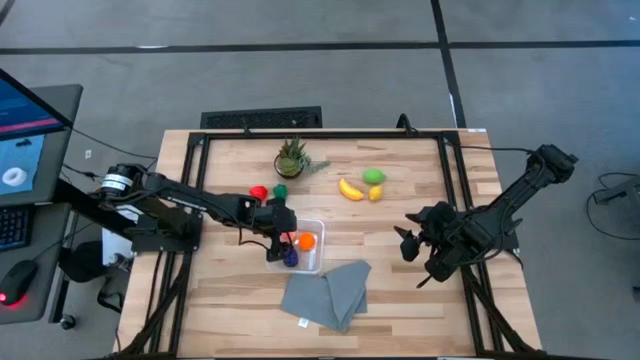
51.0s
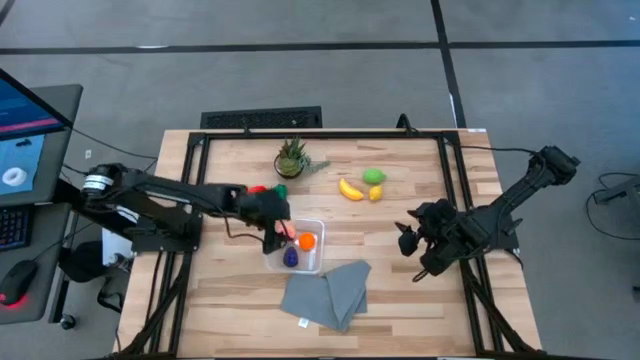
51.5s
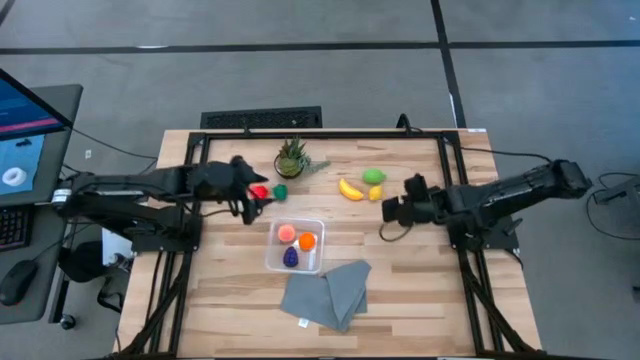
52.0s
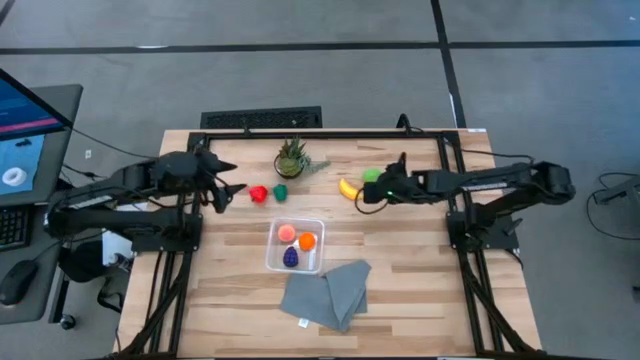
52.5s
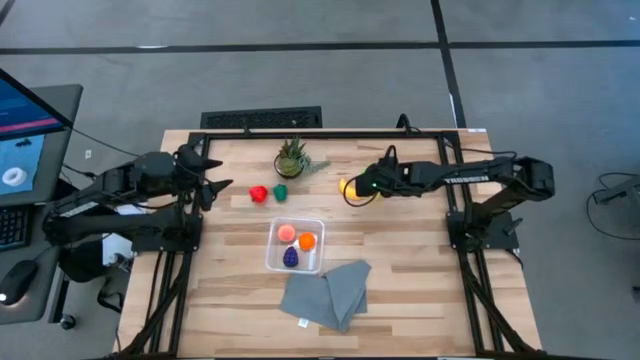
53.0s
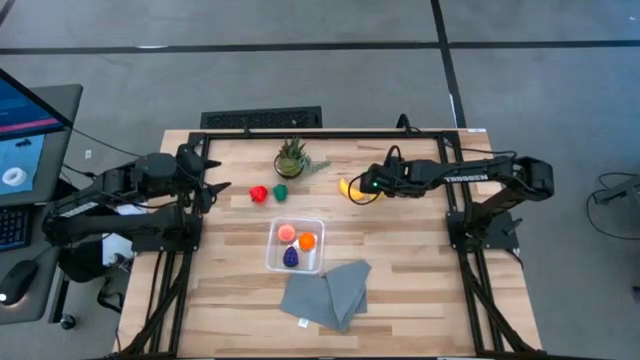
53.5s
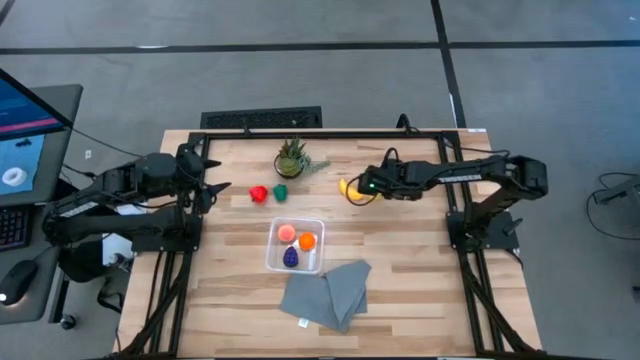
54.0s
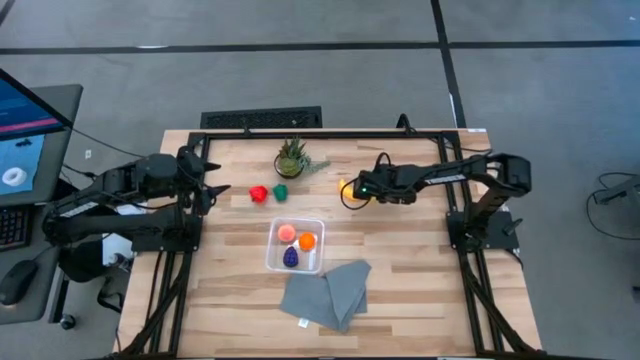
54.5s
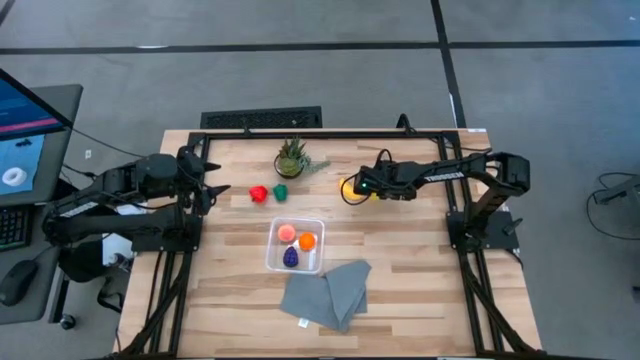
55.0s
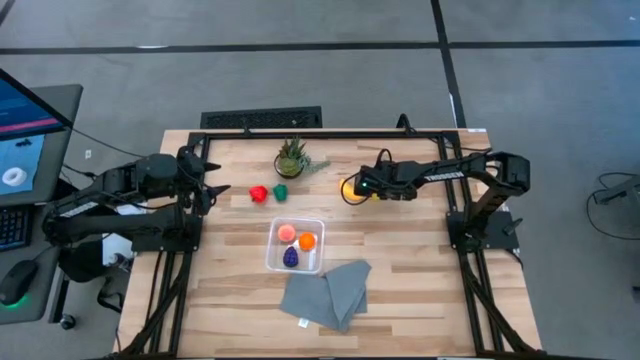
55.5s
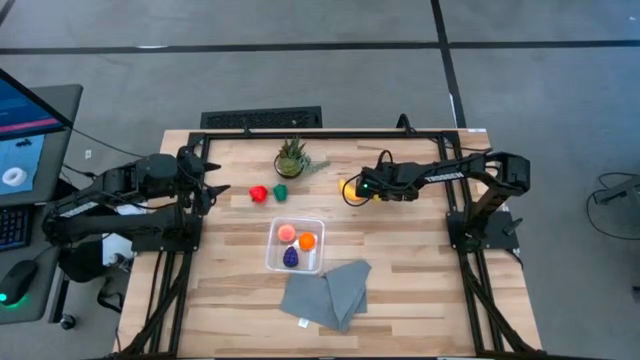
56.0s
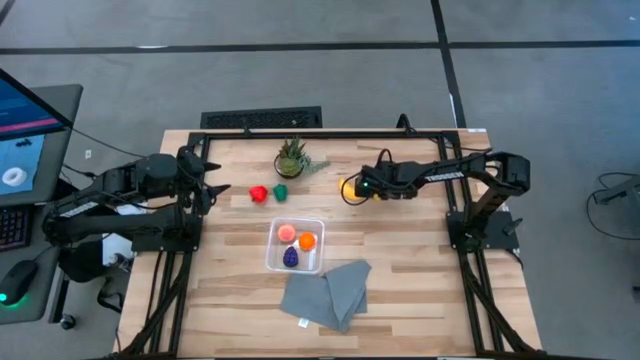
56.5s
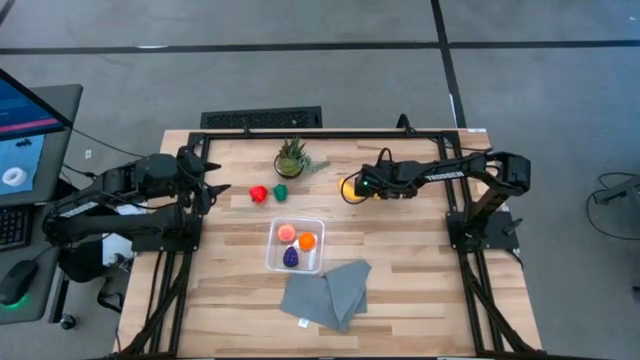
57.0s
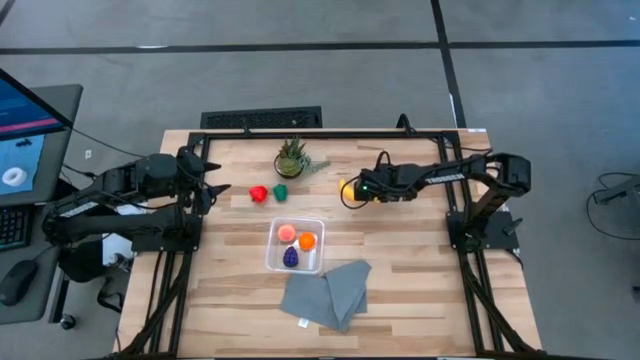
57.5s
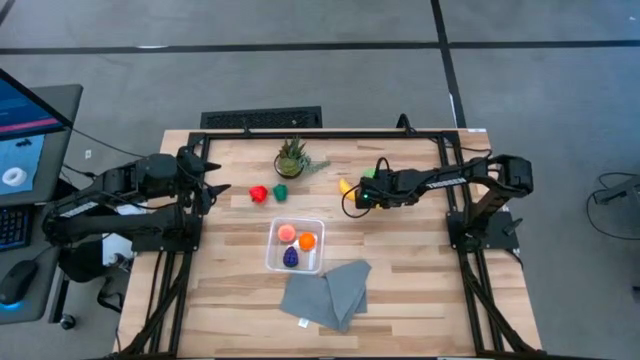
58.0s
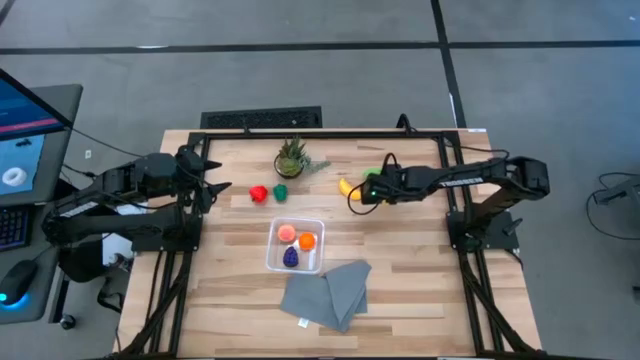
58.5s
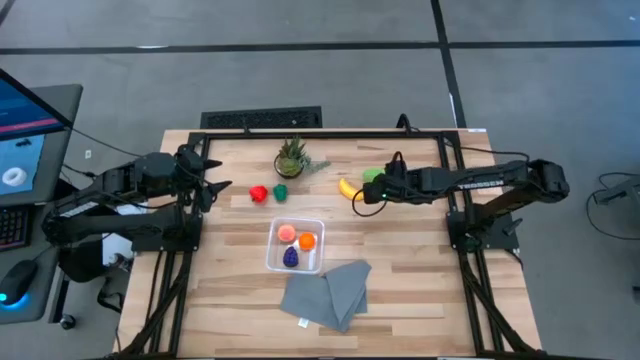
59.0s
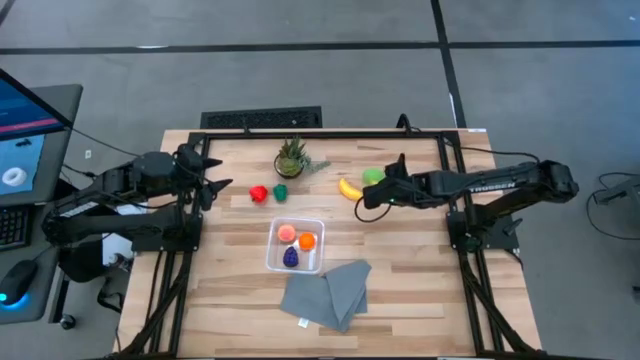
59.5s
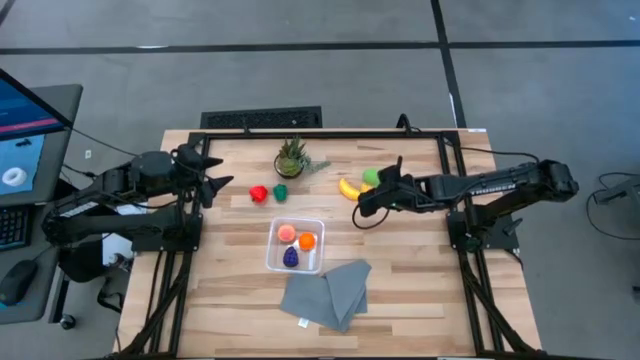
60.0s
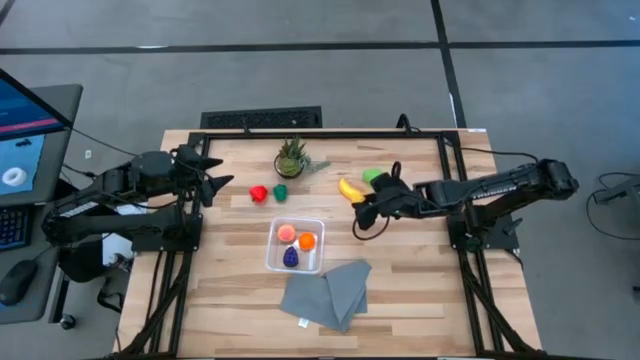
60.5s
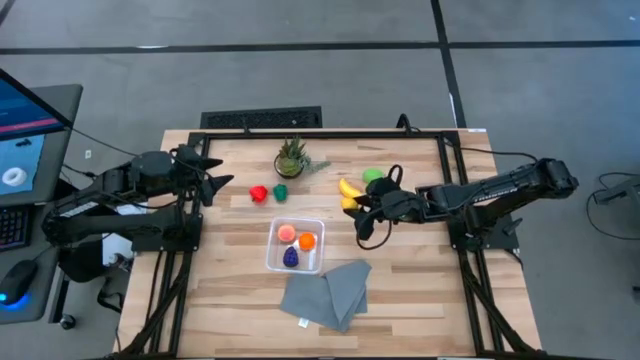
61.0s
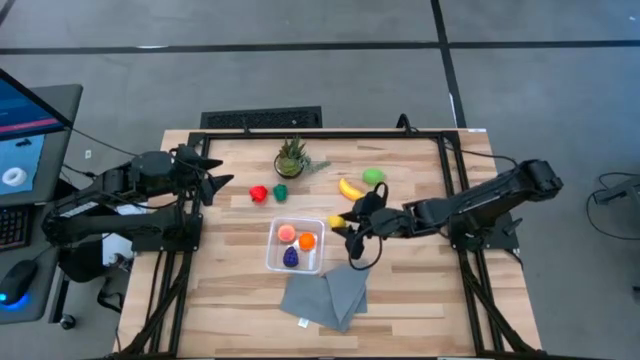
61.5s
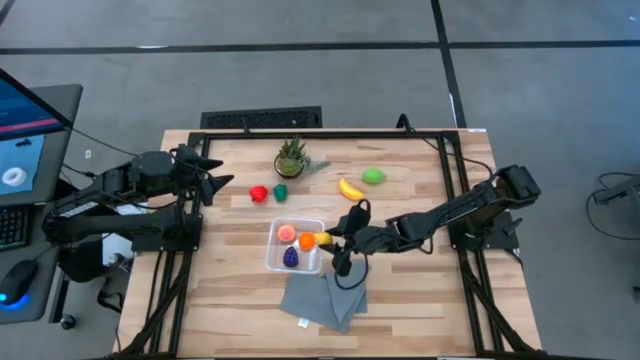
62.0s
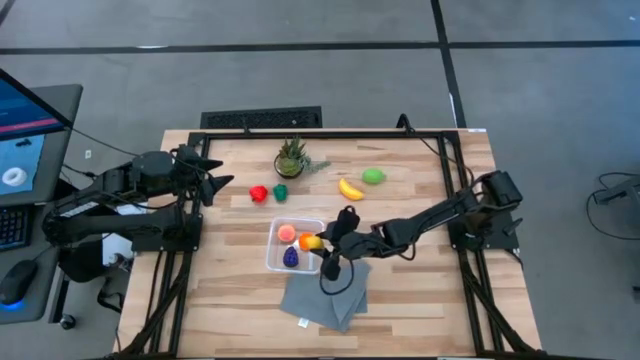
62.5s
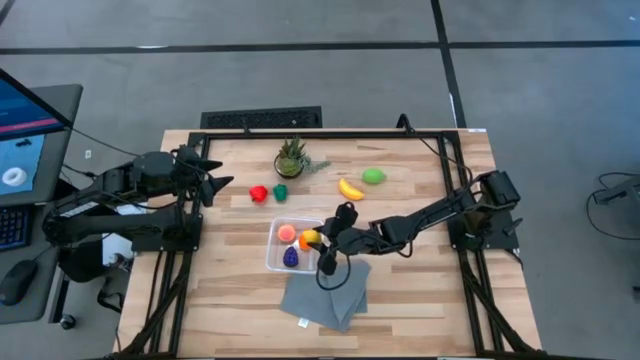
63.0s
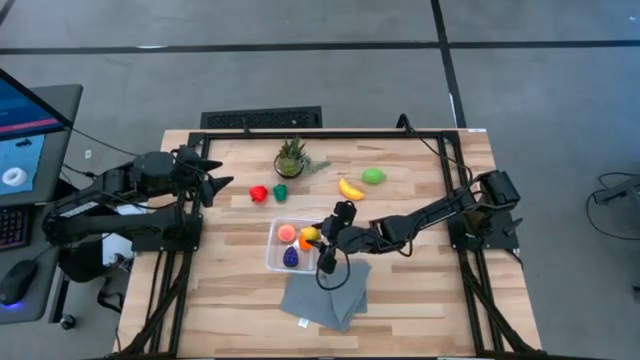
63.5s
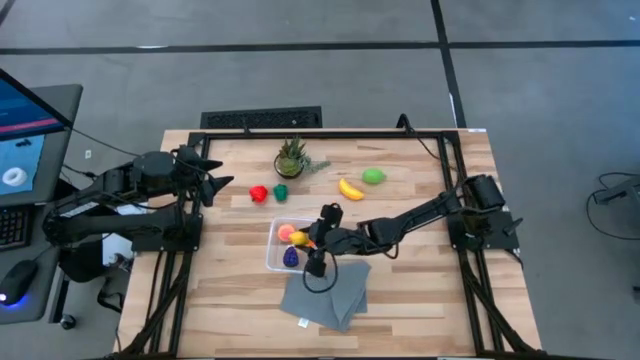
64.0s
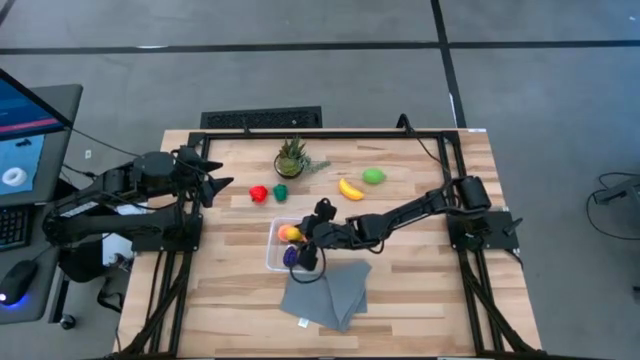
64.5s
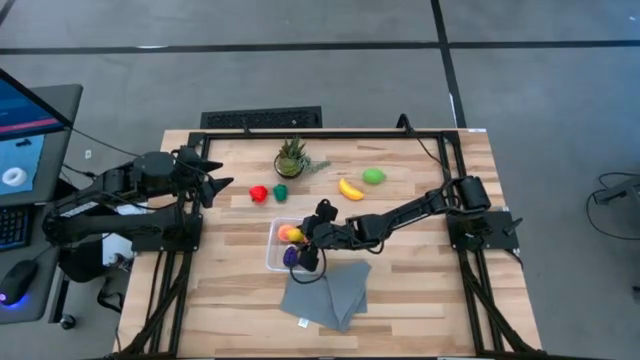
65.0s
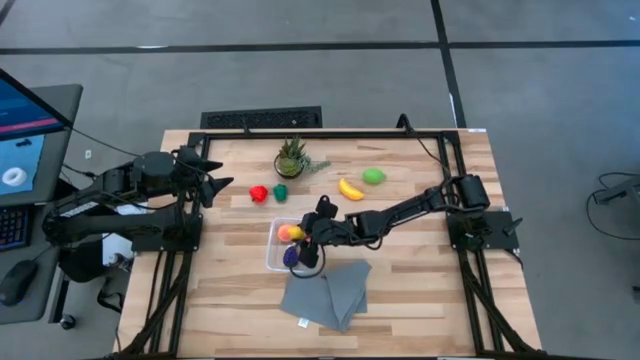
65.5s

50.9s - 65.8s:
Task: Pick and placing Produce into tupperware
Put the yellow lemon into the transparent container
